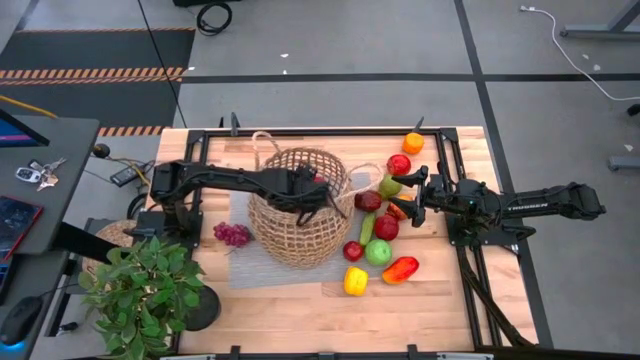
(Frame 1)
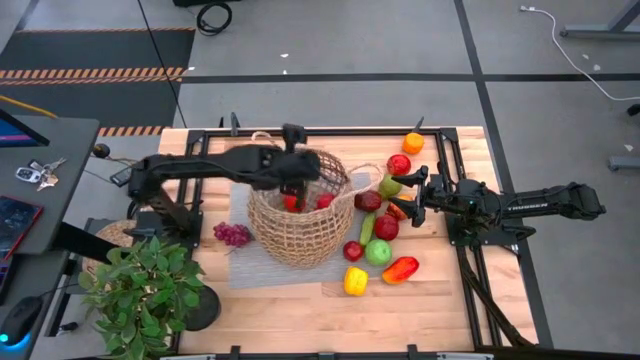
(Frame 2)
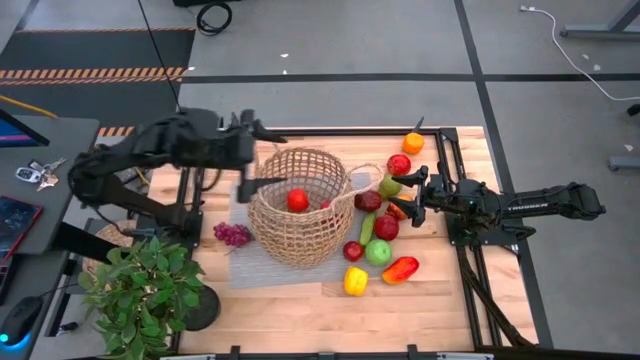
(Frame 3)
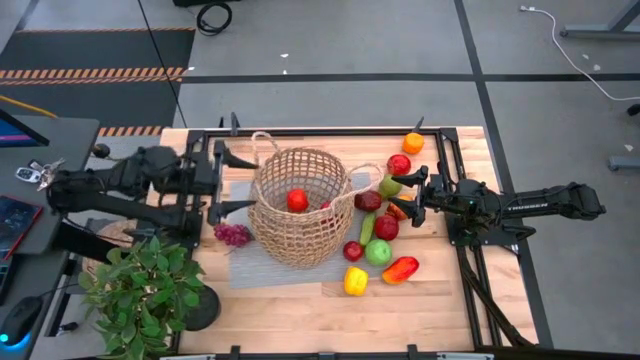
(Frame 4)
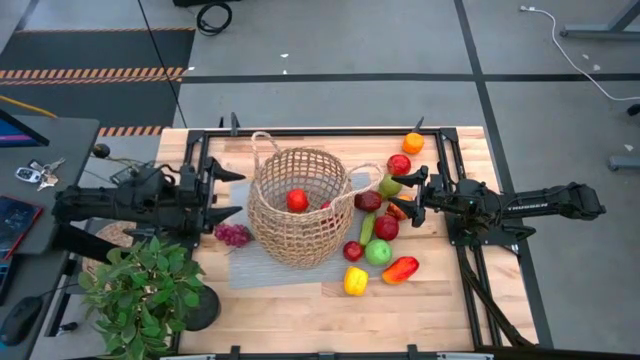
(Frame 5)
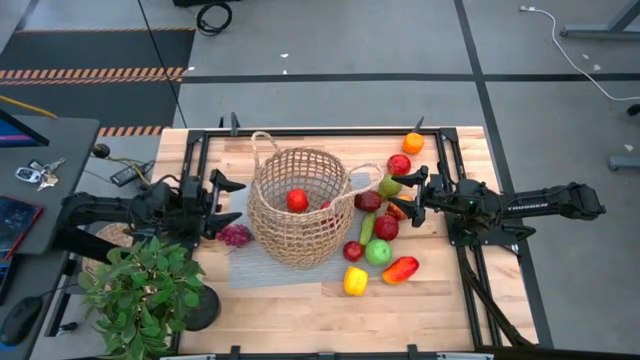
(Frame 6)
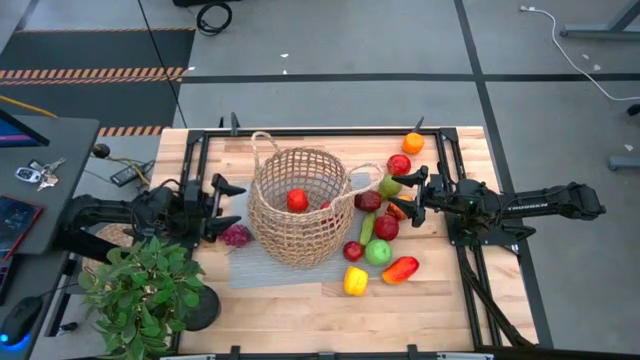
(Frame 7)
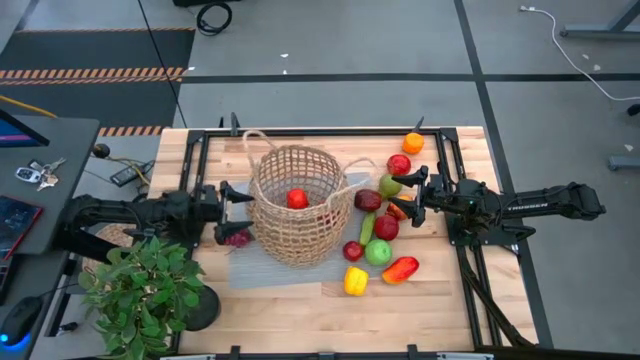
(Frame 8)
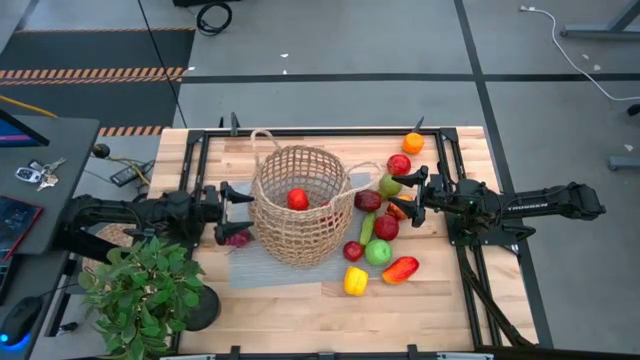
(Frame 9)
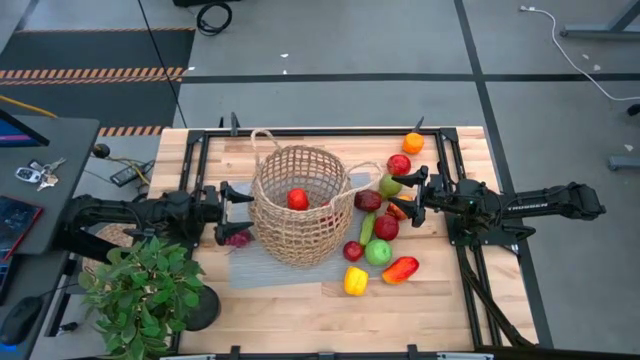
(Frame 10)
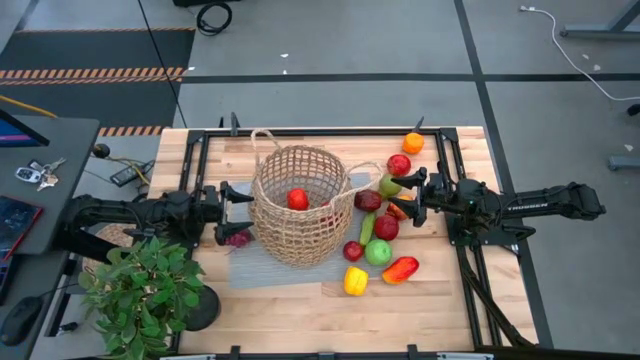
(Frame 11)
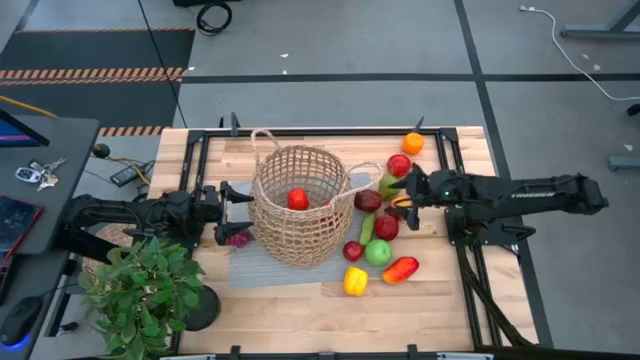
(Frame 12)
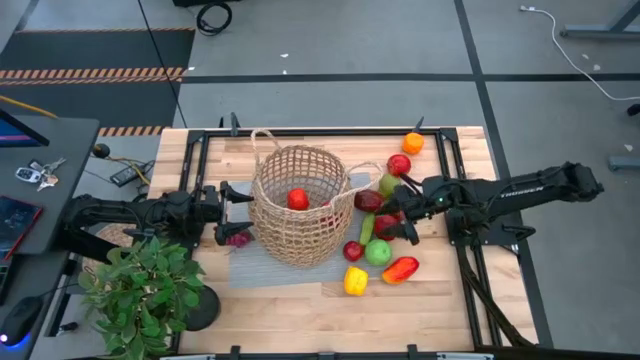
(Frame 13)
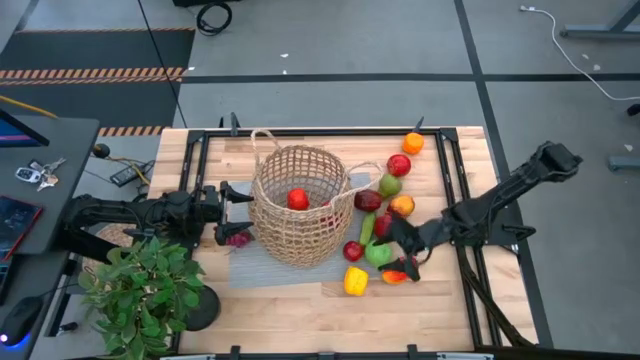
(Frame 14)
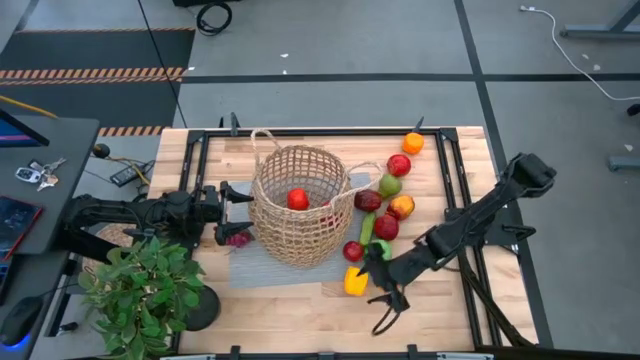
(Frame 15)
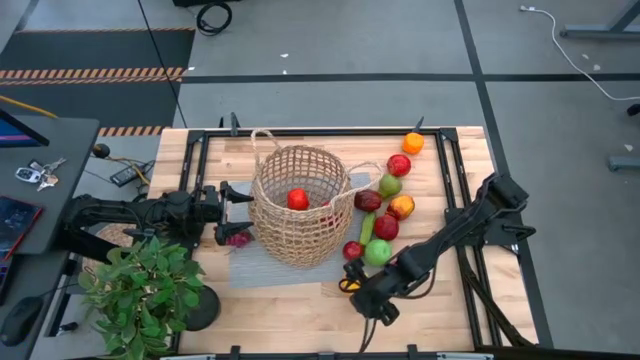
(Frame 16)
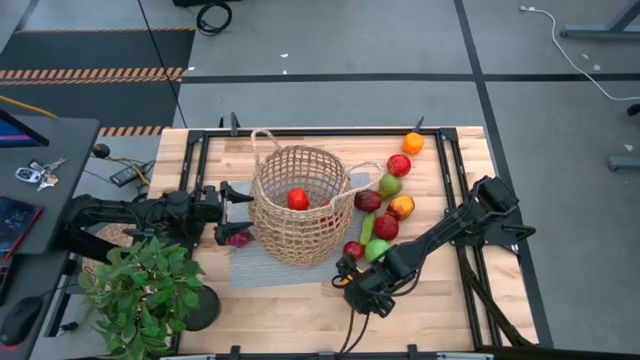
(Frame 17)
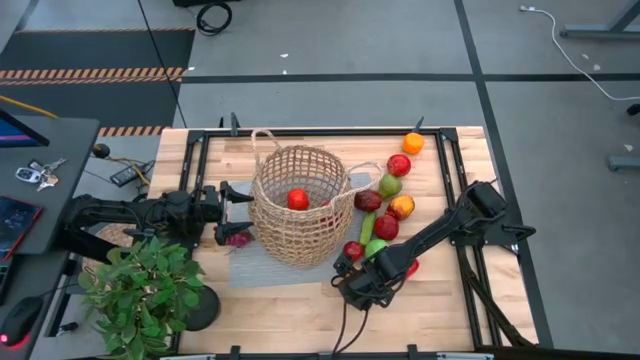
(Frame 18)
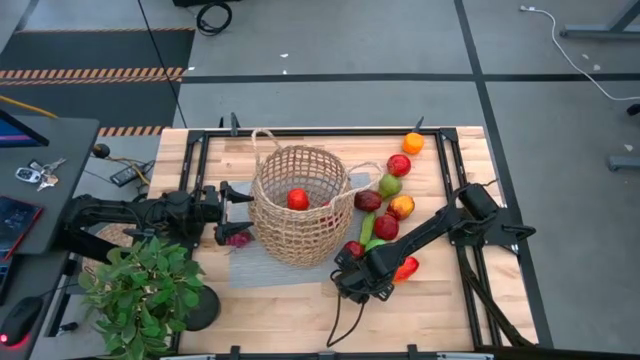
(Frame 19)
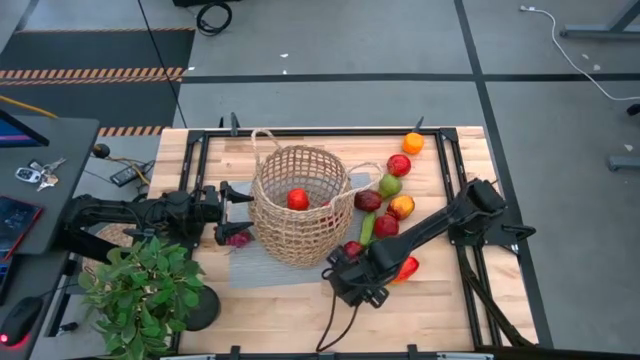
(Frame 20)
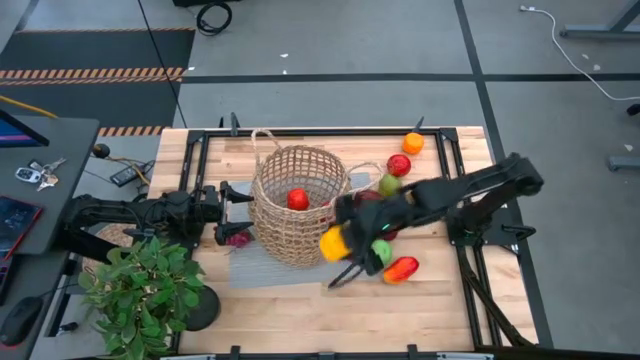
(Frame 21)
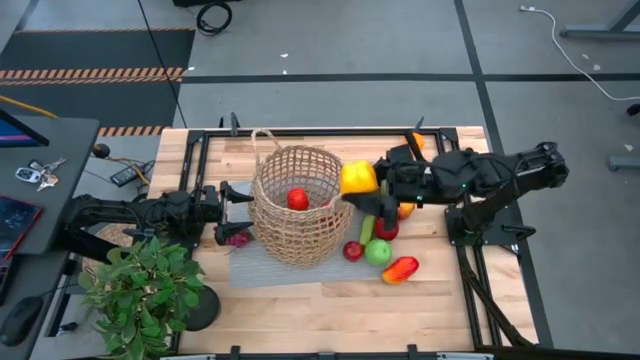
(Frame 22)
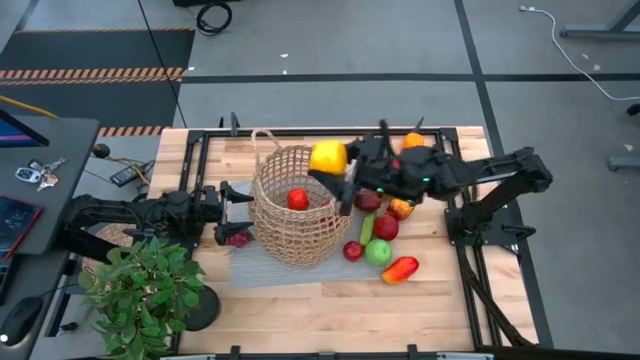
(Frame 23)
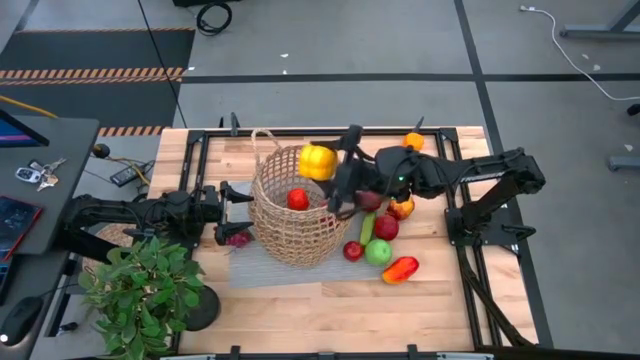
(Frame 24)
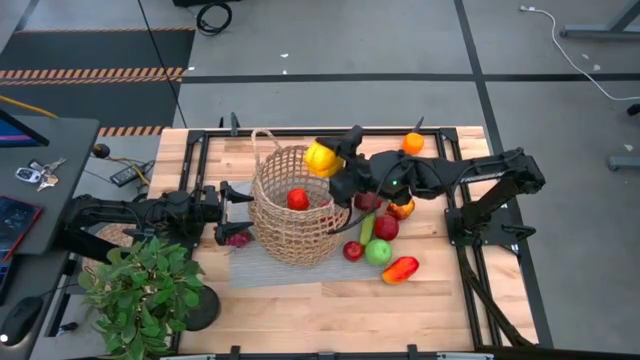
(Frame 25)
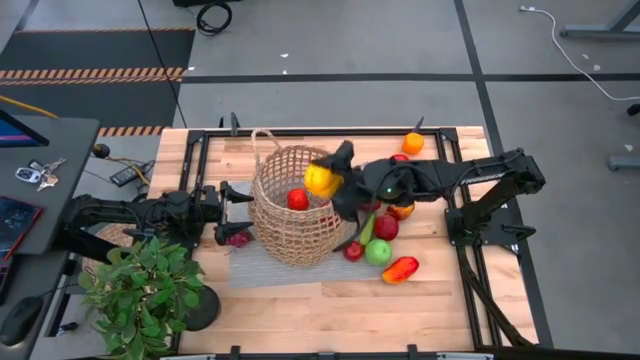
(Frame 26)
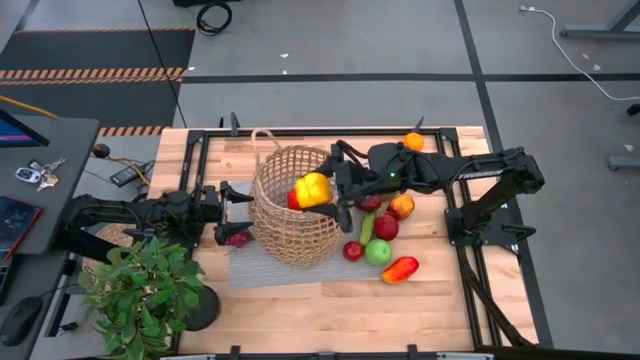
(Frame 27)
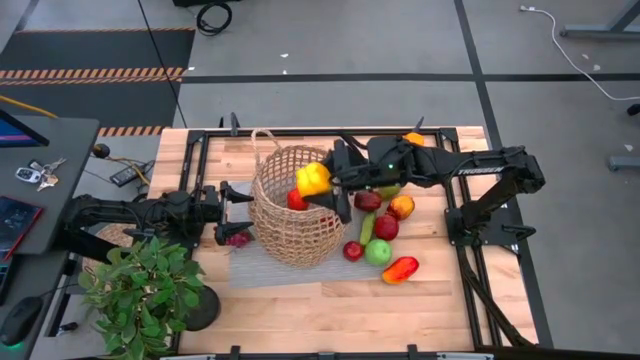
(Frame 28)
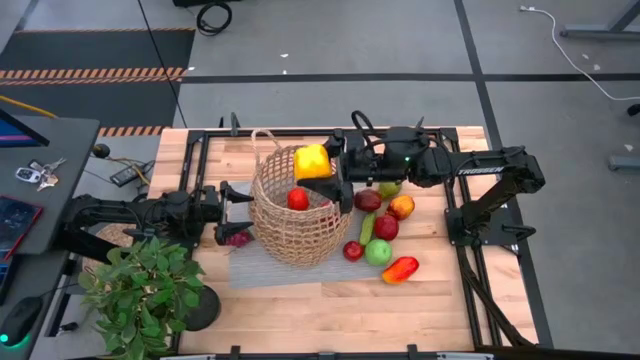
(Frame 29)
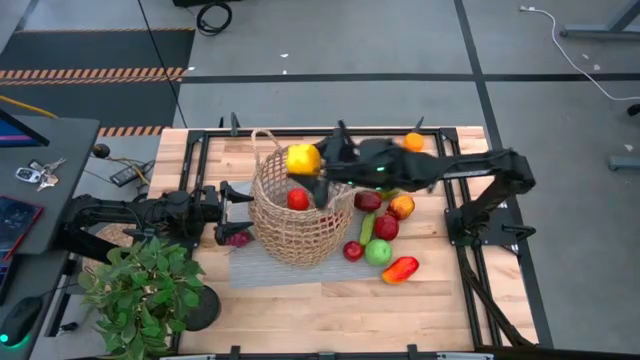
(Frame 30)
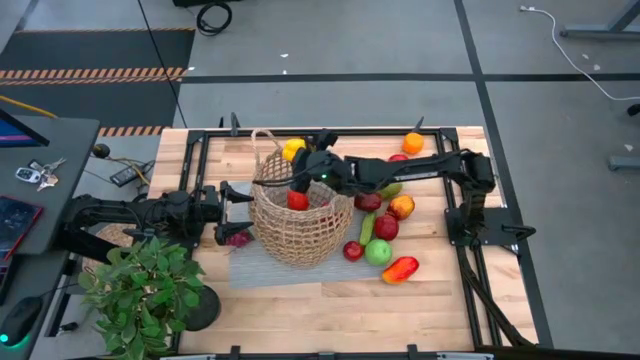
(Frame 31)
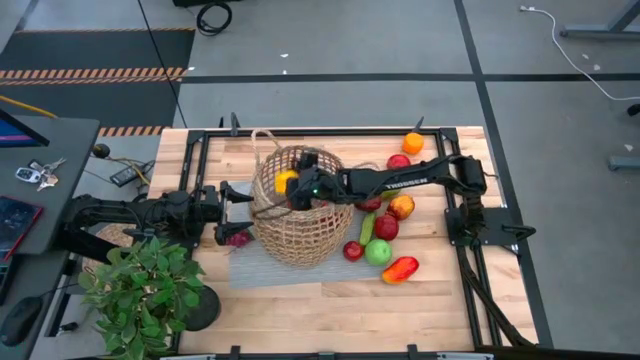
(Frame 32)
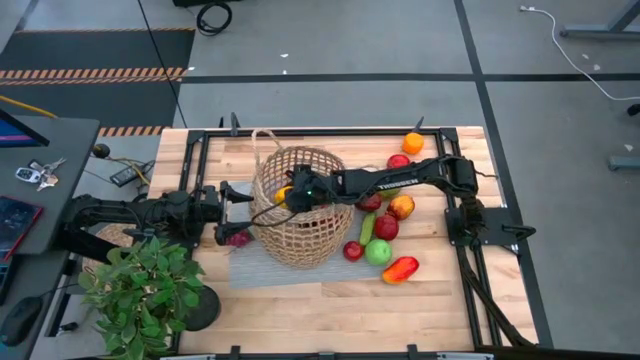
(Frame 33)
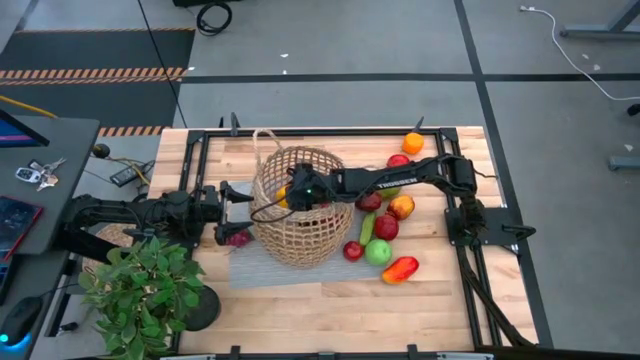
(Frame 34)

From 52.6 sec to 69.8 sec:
Task: Build produce basket
Put the yellow bell pepper into the brown basket

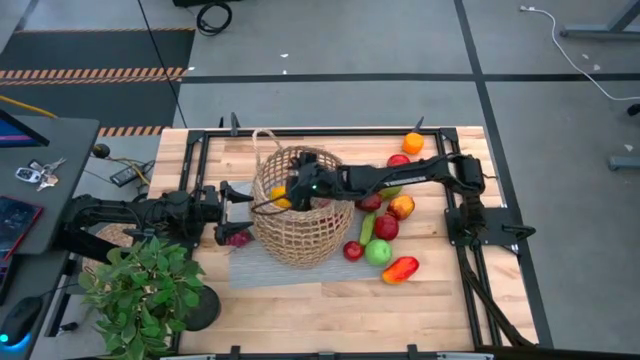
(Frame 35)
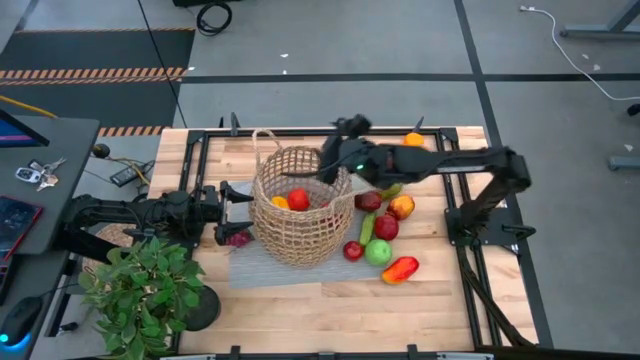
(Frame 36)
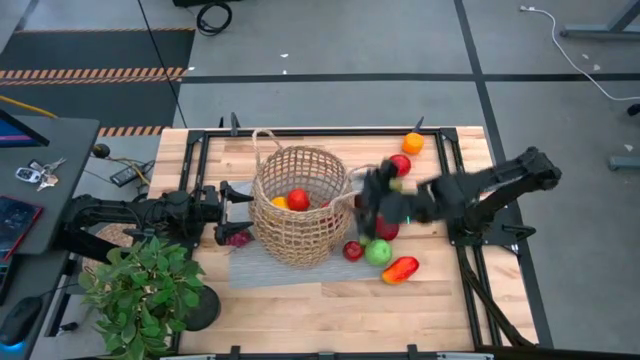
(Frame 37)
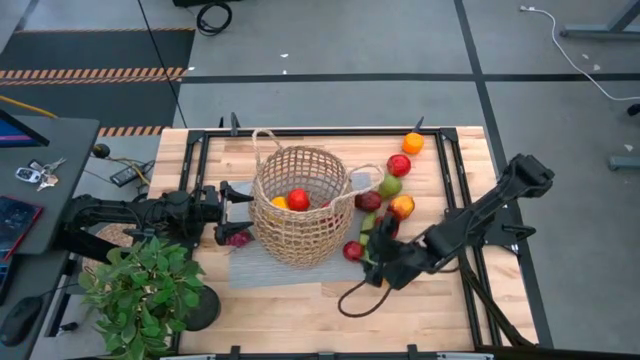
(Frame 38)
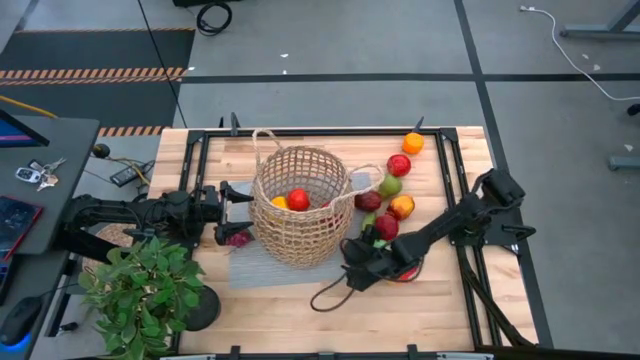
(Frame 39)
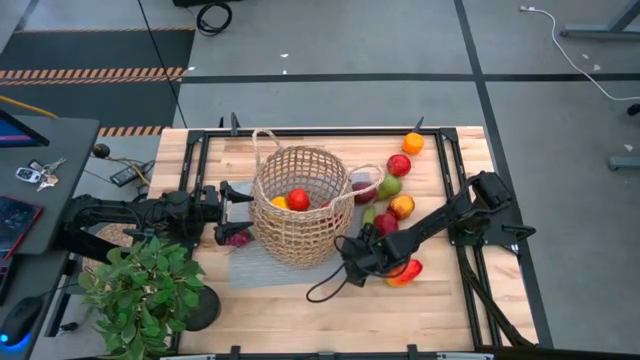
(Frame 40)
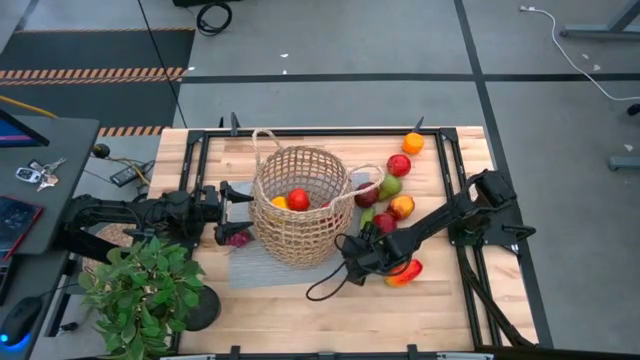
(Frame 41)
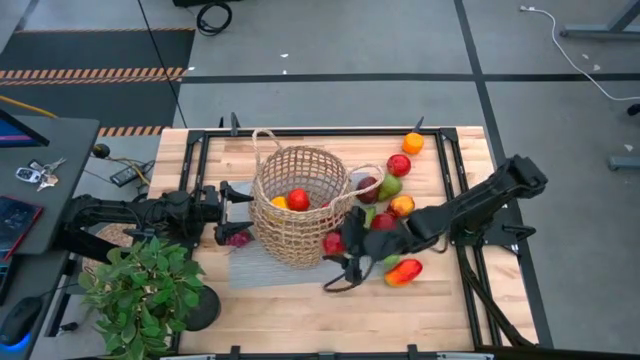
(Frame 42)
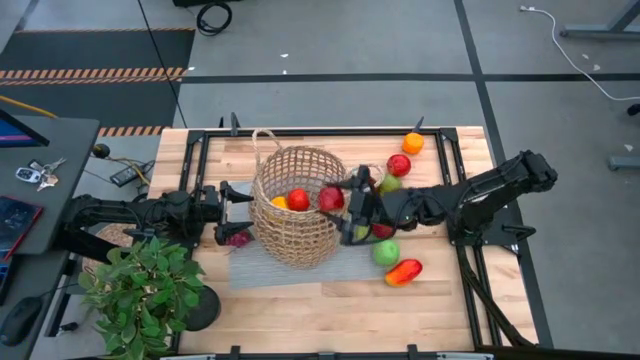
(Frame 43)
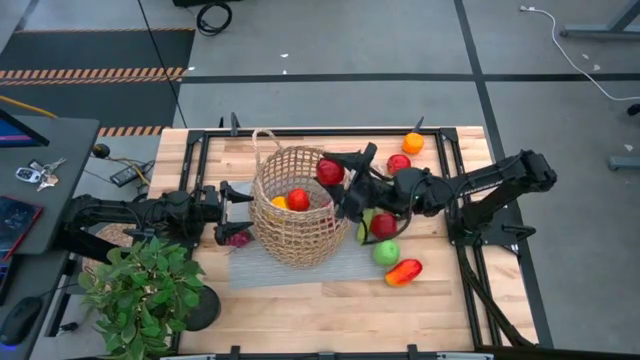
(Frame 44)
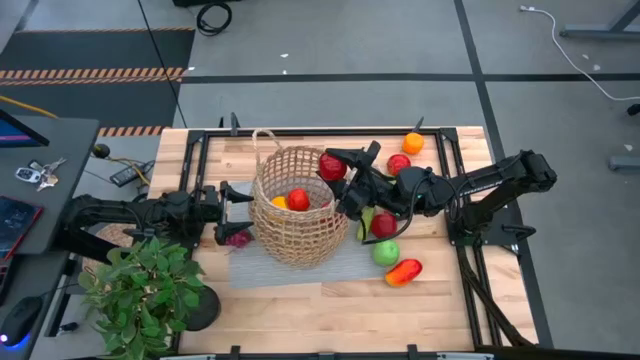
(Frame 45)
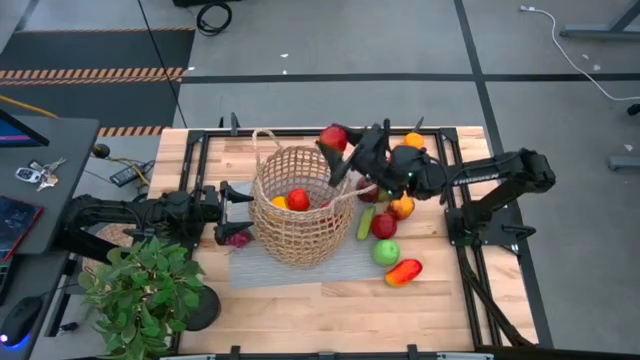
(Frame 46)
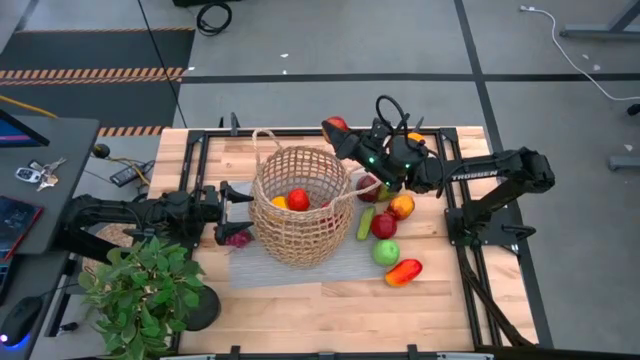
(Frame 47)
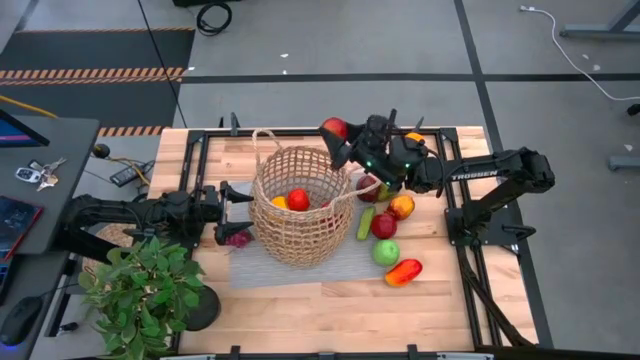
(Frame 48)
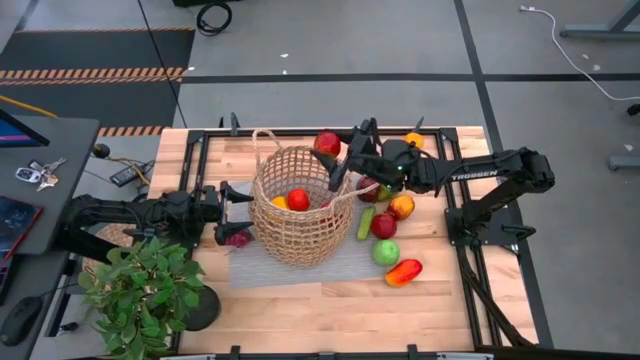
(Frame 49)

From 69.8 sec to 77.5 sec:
Put the red apple into the brown basket
